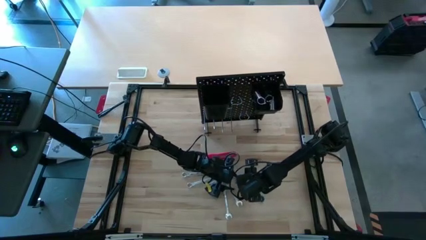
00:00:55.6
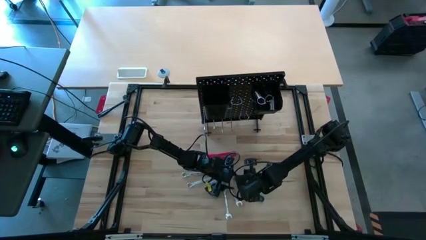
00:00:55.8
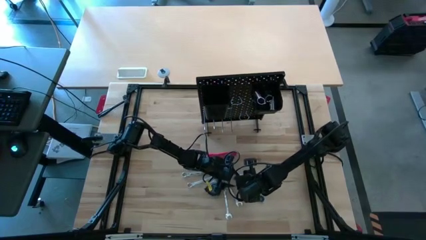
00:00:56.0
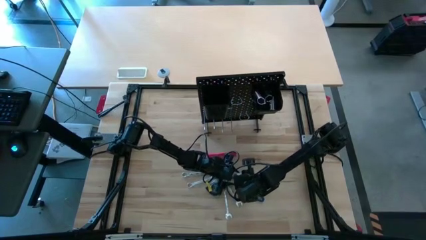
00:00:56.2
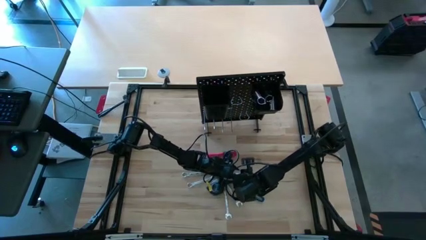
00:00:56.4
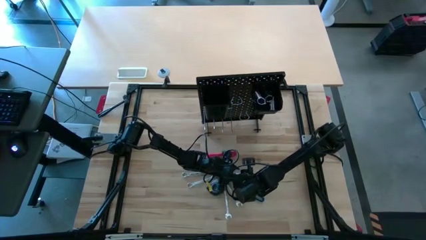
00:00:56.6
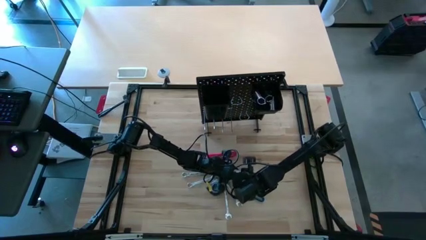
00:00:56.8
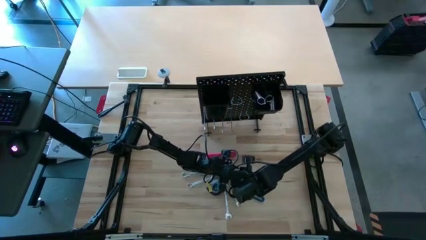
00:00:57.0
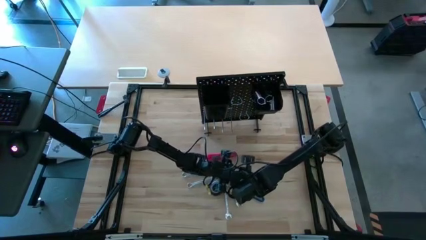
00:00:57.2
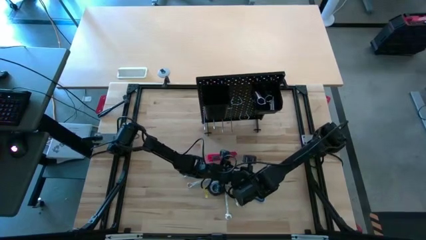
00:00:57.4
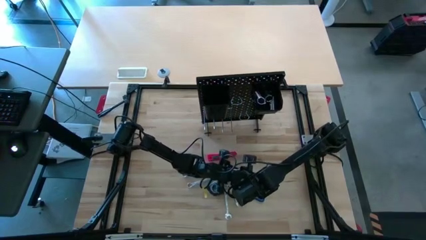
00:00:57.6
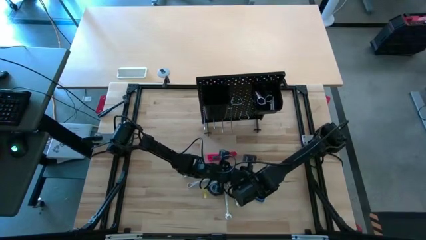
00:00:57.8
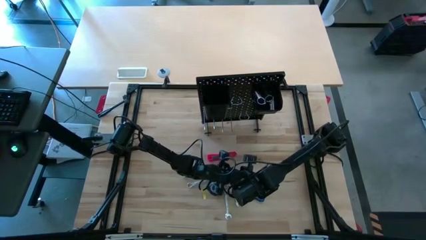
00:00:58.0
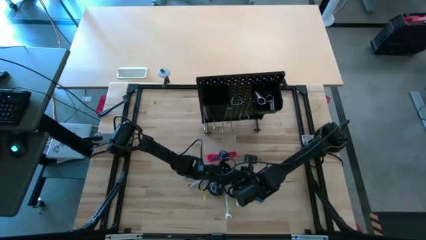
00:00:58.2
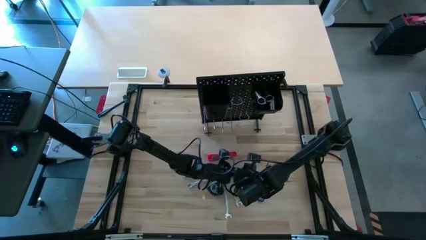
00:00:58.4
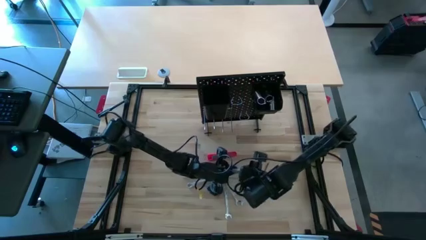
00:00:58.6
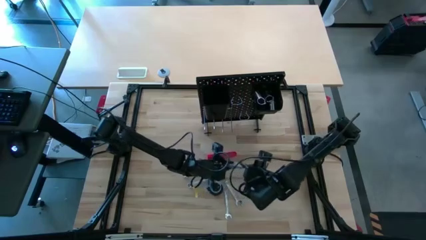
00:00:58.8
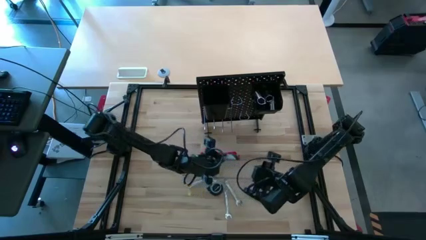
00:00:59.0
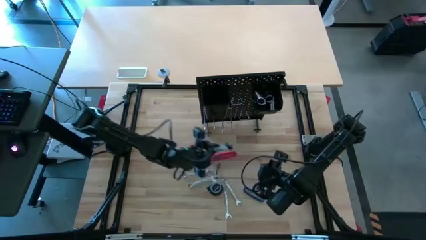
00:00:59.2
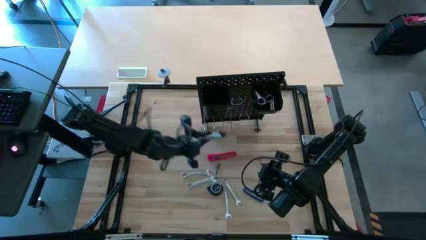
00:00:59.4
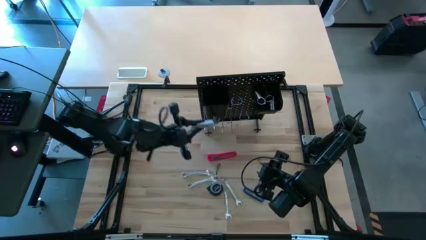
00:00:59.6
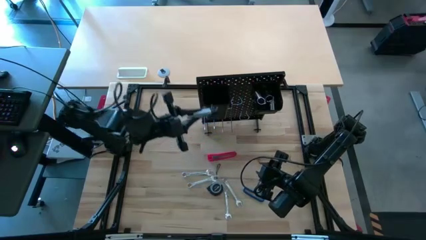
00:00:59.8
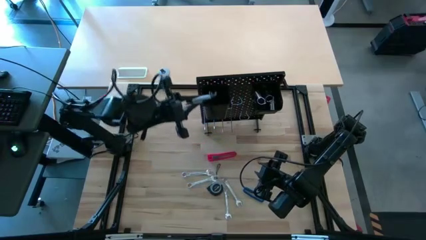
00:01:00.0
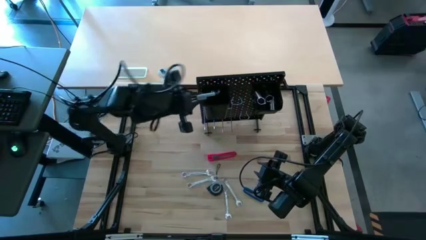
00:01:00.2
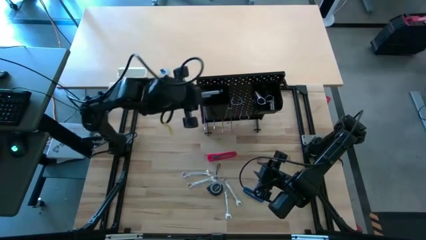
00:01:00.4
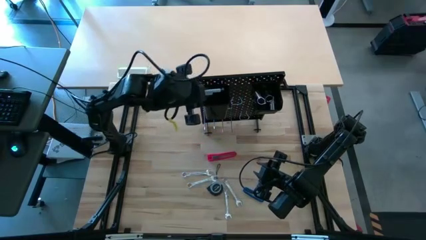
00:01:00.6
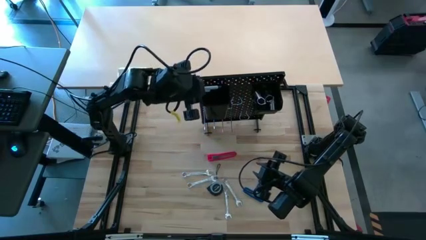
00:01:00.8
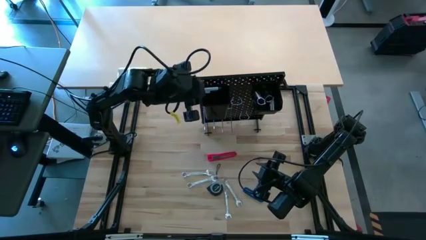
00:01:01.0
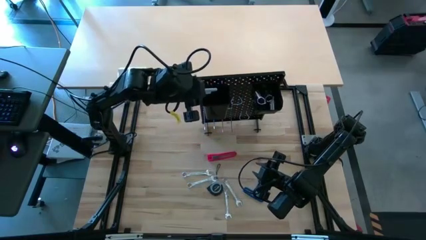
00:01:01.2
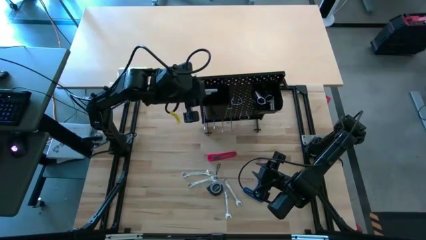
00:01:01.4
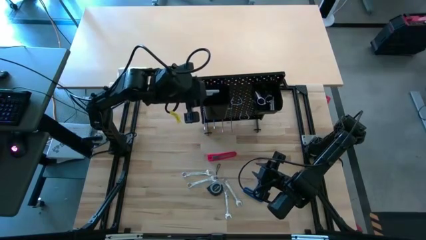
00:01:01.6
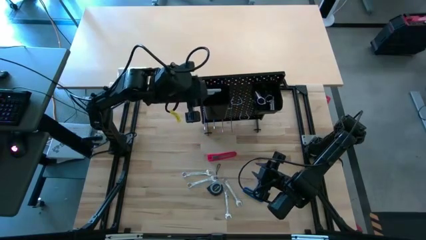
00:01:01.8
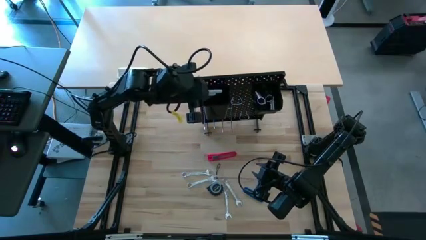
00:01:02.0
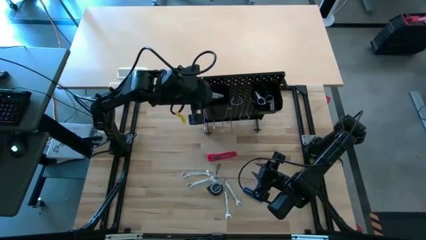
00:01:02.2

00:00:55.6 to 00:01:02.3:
Task: Hang tools onto peg board
Put the hex key allen wrench into the peg board

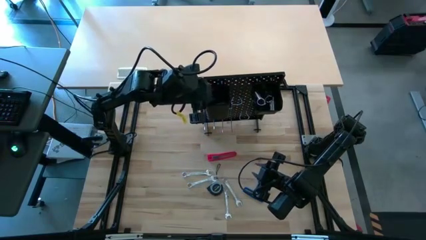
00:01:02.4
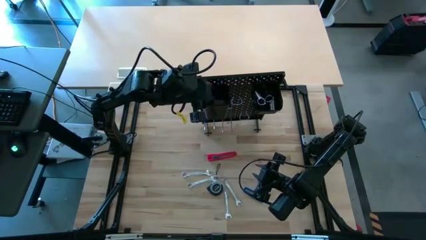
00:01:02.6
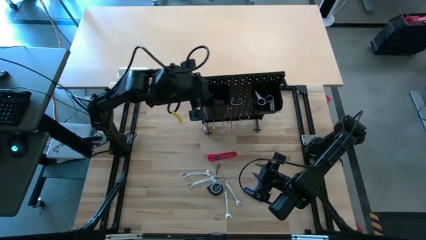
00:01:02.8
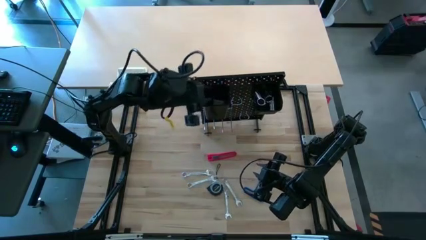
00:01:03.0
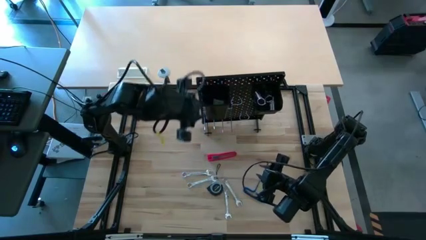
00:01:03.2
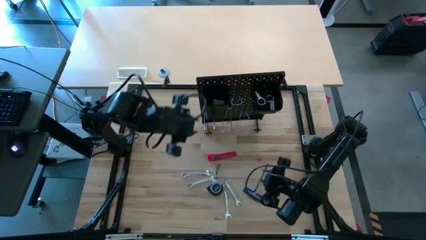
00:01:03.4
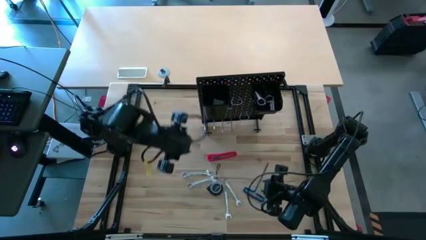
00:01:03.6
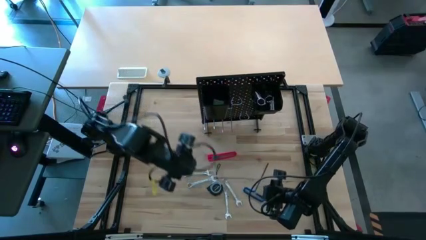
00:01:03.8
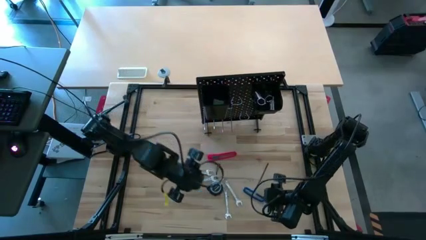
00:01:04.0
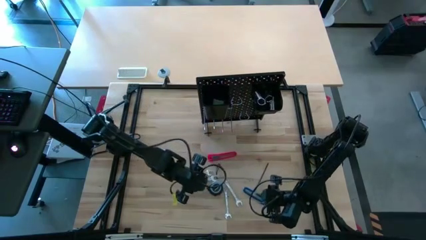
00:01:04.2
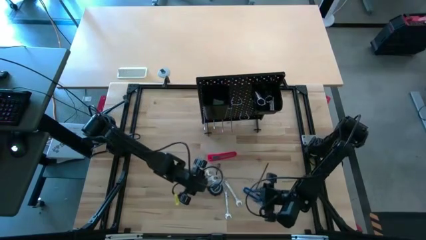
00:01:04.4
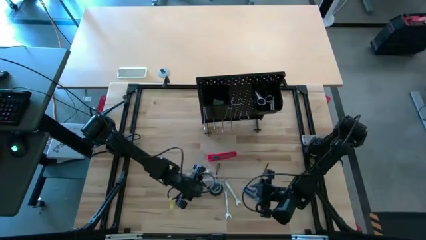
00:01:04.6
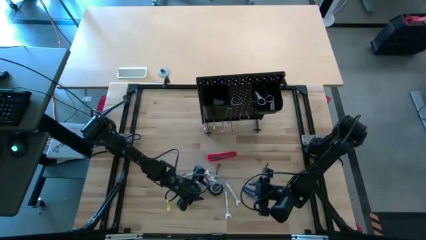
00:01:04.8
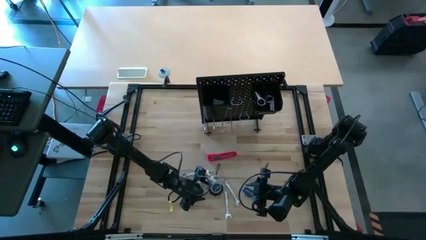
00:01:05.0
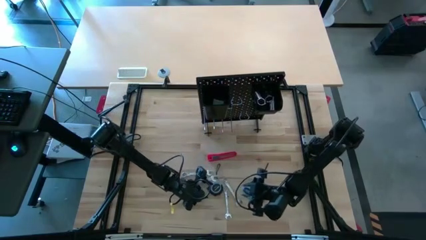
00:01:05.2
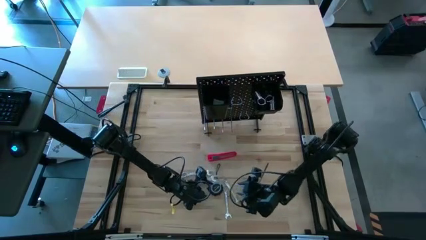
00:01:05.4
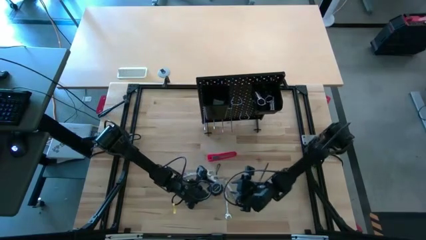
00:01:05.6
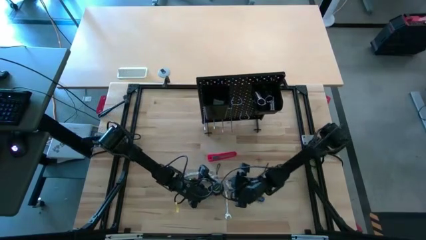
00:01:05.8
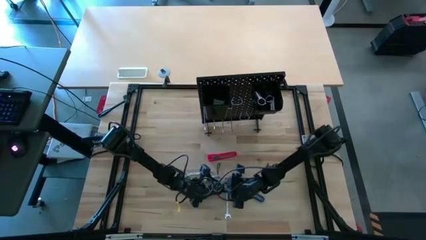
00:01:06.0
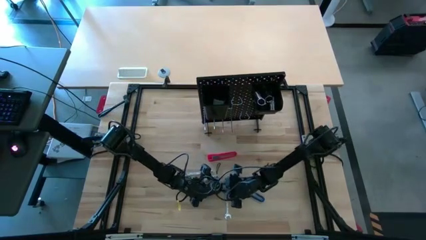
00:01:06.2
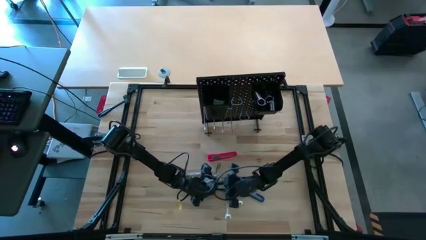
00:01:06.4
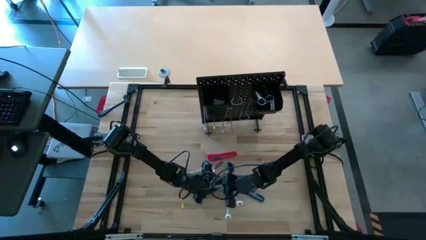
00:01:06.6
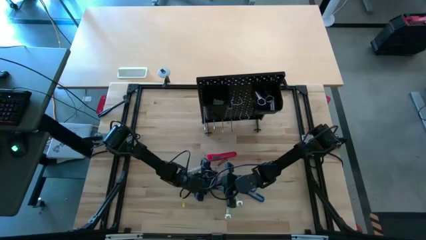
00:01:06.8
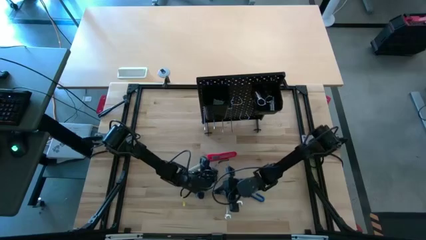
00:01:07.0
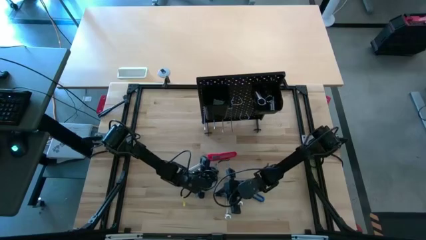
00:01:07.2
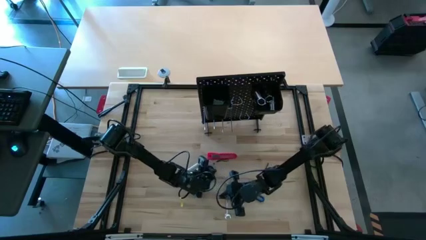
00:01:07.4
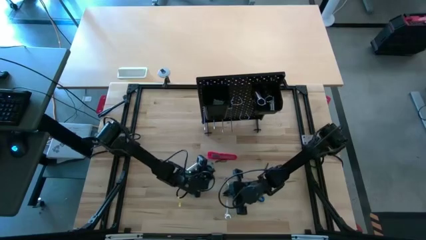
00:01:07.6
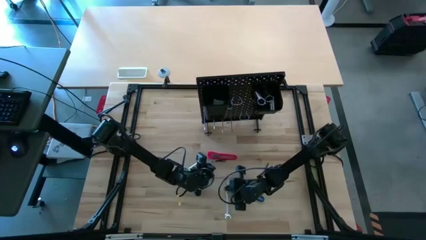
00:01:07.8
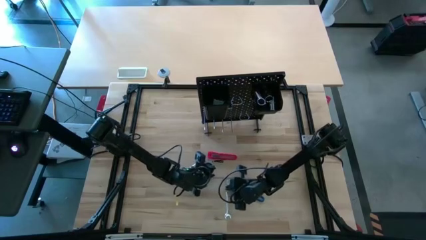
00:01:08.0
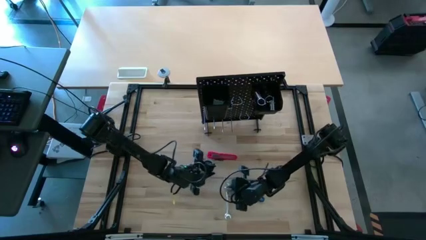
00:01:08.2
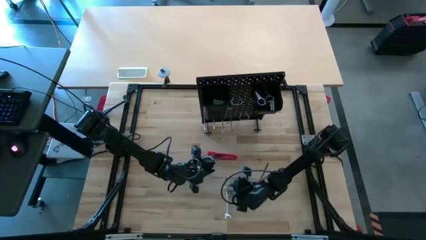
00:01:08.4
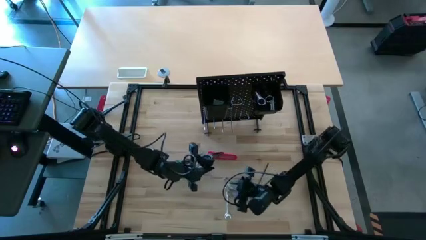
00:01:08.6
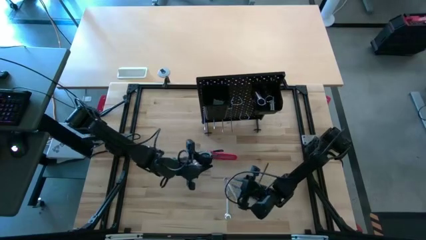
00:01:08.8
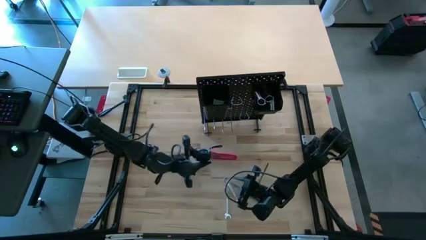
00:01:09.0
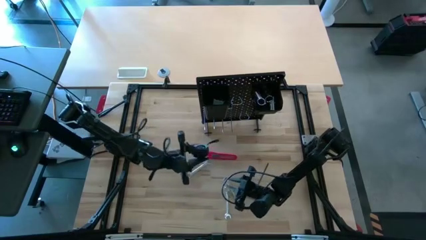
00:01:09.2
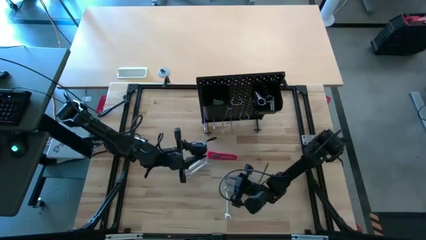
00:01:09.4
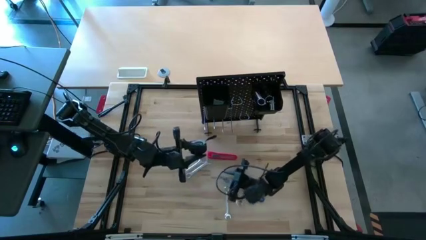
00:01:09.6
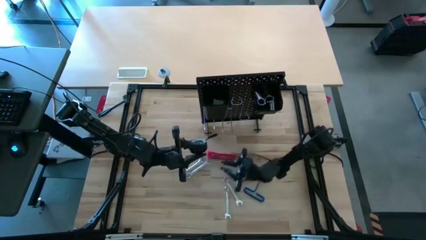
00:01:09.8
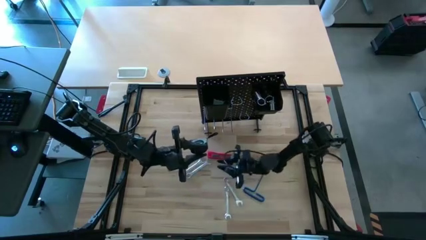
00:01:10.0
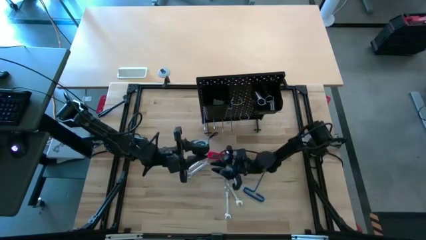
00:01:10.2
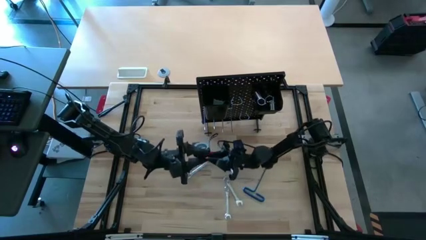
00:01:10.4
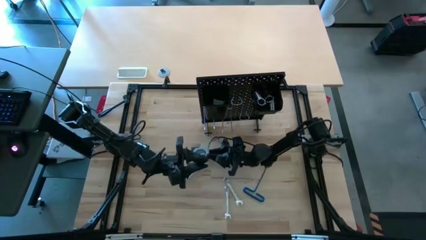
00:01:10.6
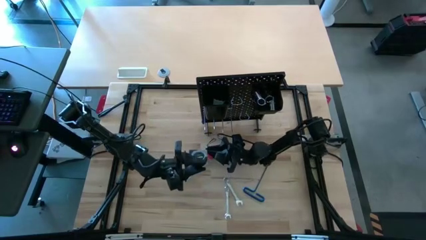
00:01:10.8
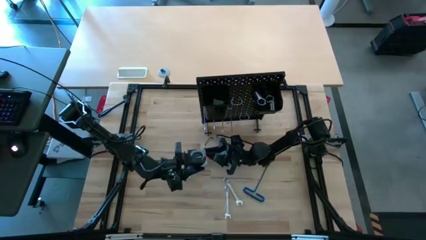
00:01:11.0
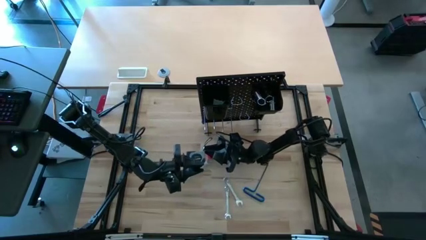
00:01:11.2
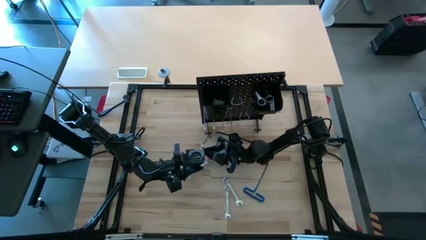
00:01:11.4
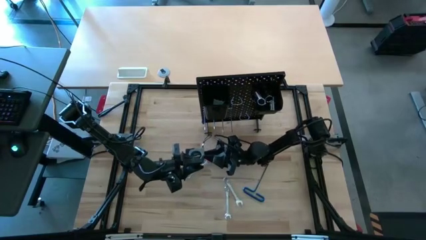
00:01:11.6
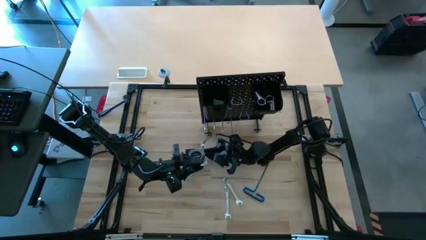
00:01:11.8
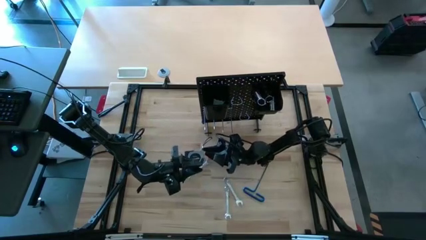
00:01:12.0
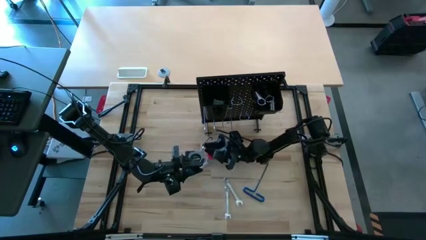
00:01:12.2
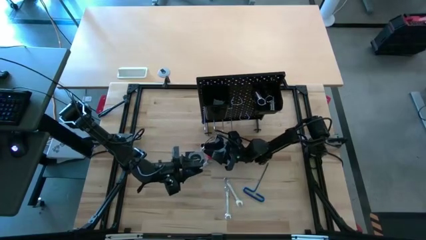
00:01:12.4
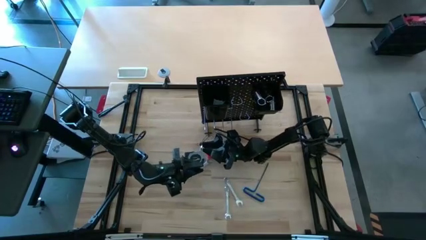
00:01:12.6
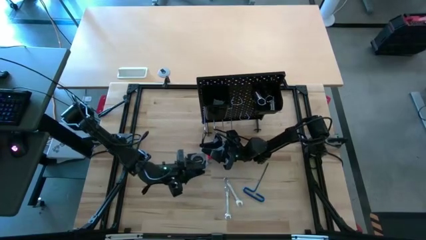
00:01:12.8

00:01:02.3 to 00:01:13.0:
Hang the measuring tape on the peg board
